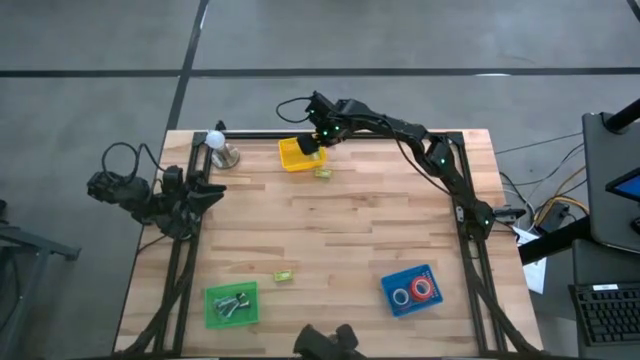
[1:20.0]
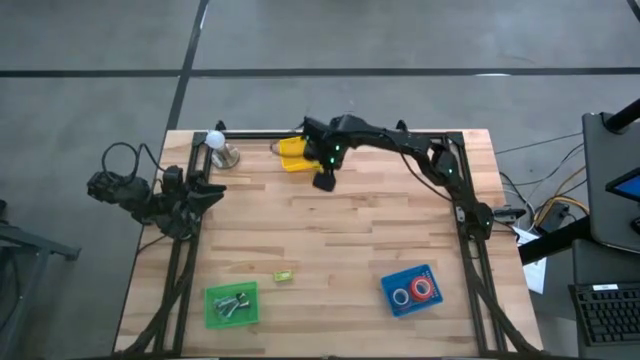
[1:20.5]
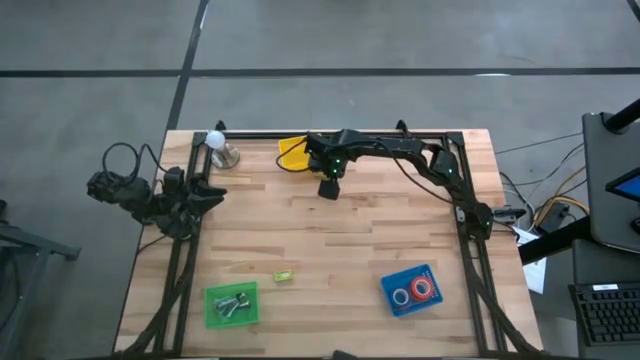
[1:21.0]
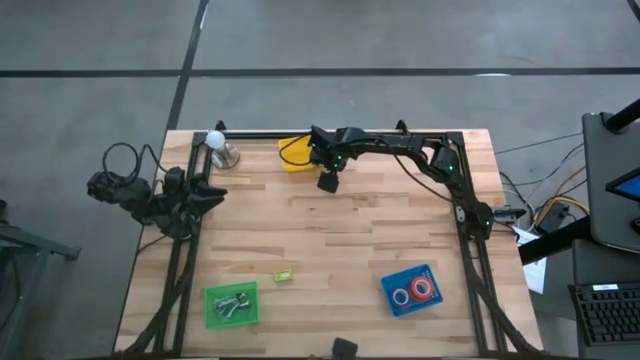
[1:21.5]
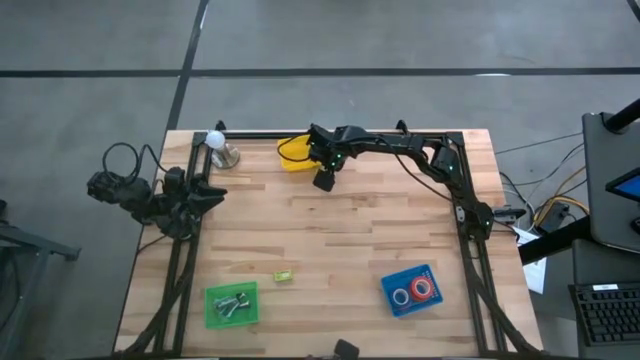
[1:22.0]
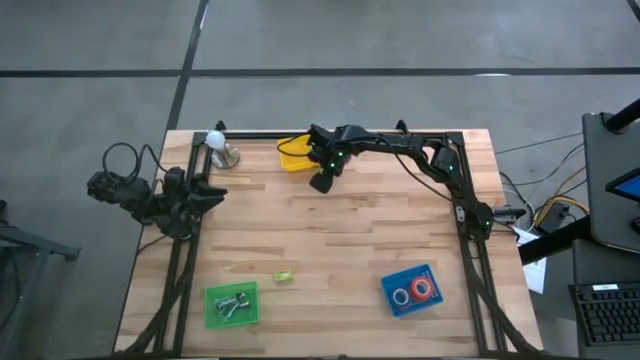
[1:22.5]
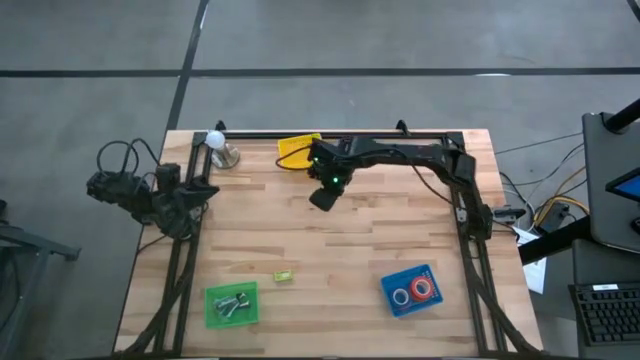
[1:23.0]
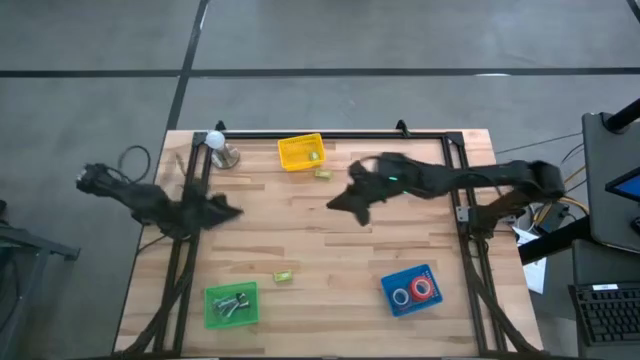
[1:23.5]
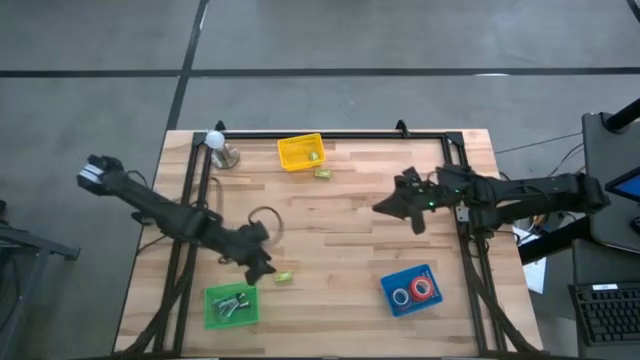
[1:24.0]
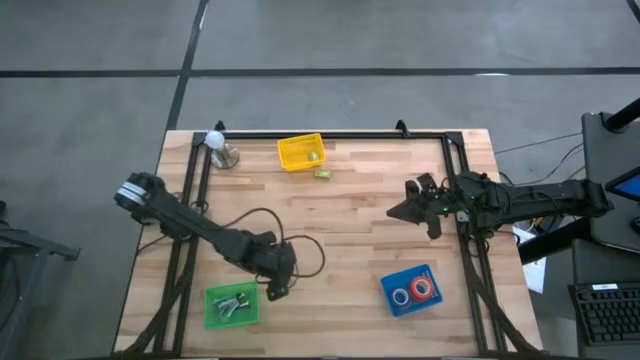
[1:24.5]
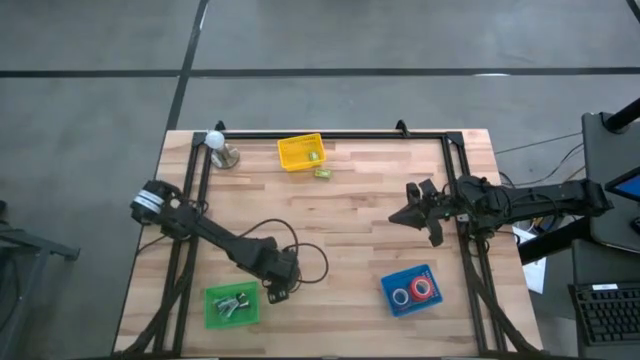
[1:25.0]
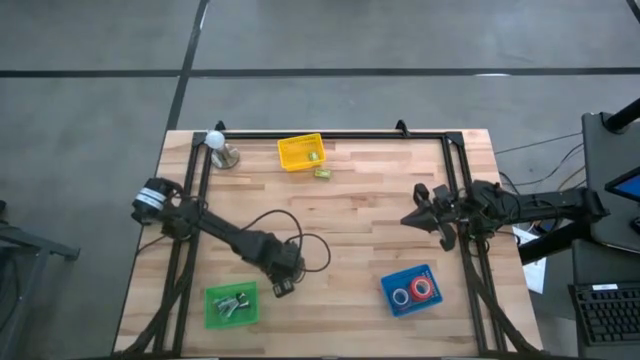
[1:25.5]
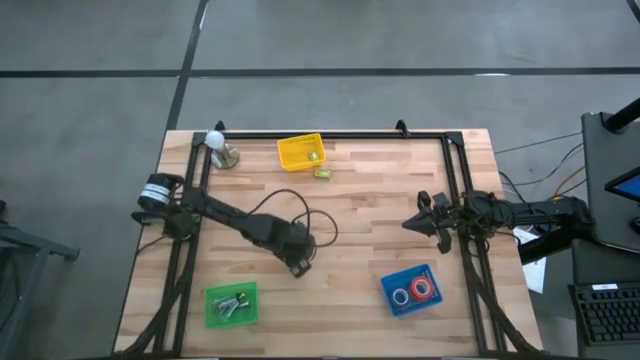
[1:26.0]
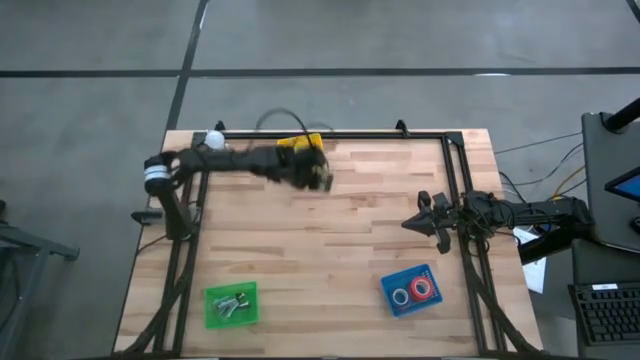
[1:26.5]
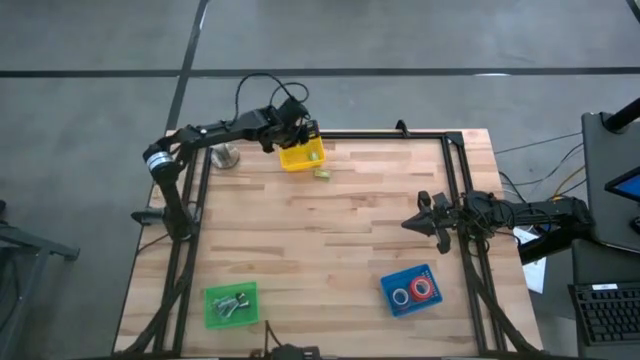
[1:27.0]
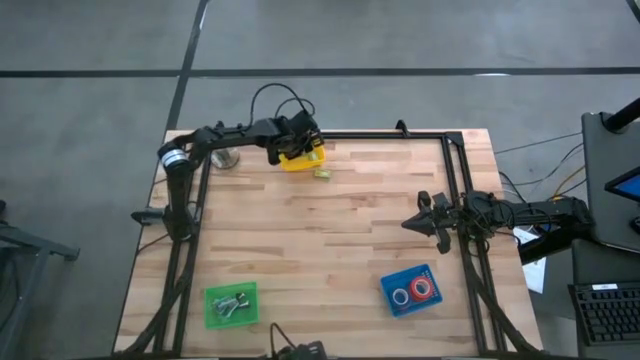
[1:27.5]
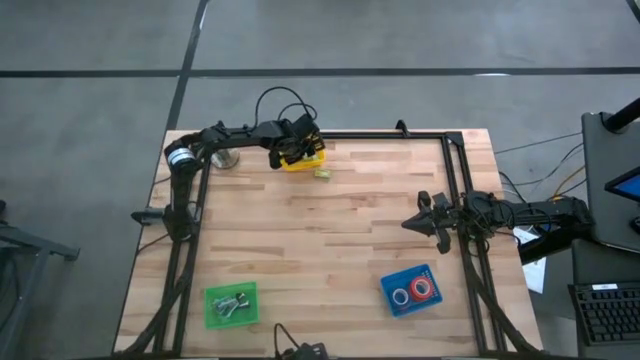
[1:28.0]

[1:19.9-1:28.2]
Task: Pick and place Stapler, Stapler remover, tape
Put the bottom green staple box into the yellow basket

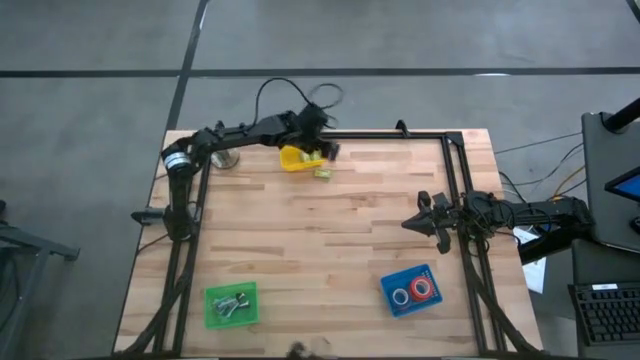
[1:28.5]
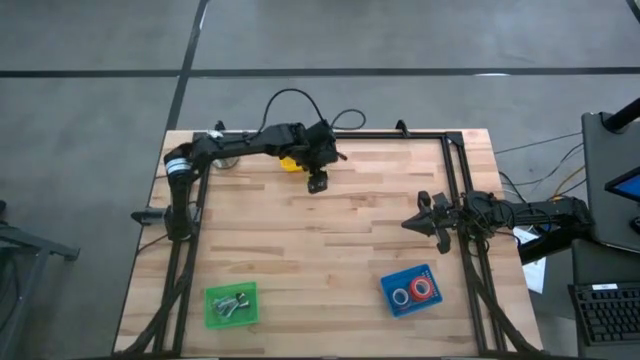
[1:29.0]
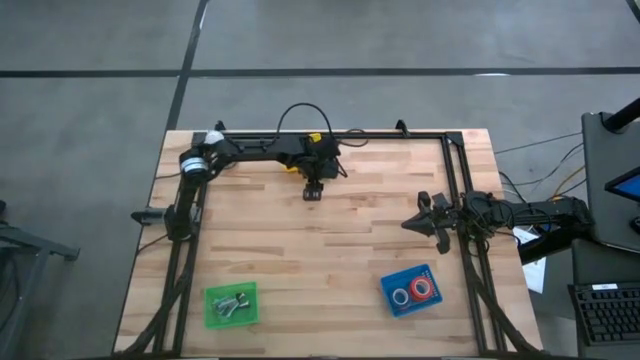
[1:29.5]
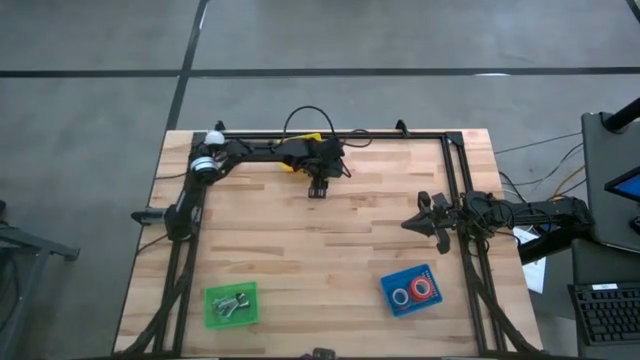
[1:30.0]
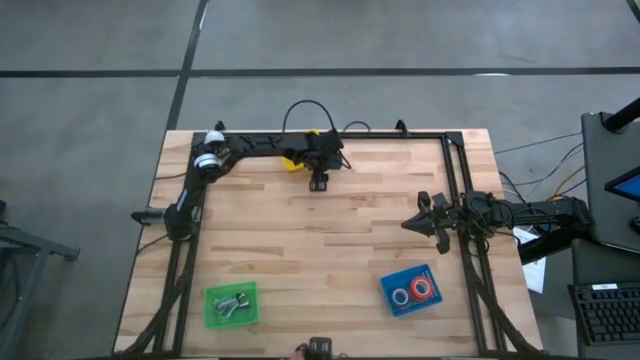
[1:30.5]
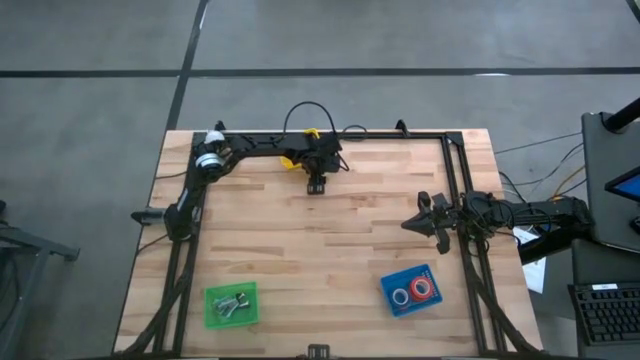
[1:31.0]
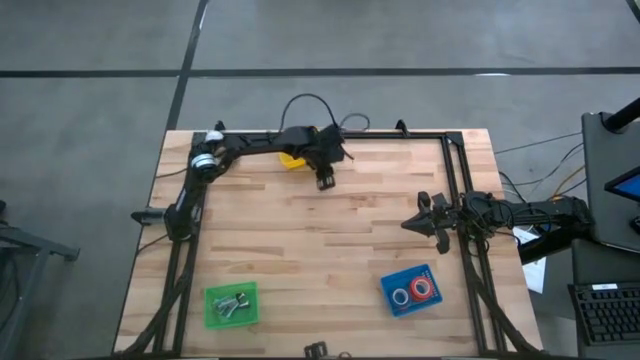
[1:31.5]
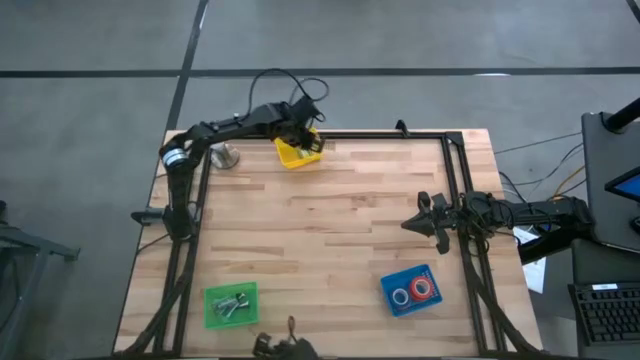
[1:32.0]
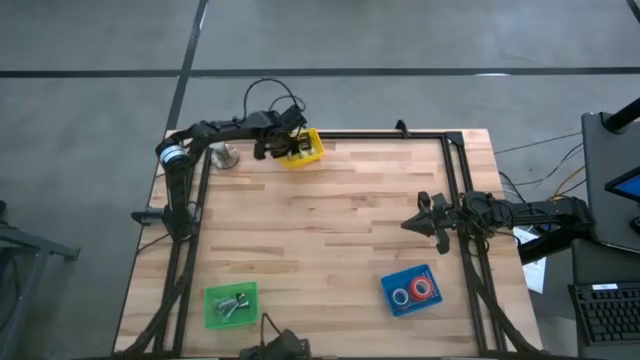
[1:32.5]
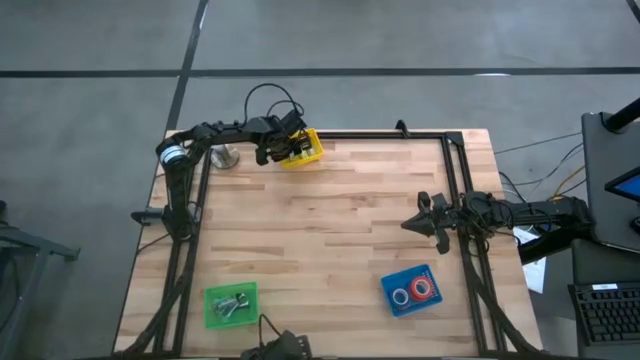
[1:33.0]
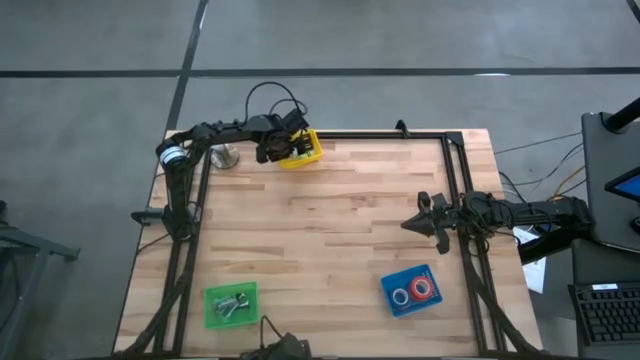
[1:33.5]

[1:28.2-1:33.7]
Put the green staple box into the yellow basket

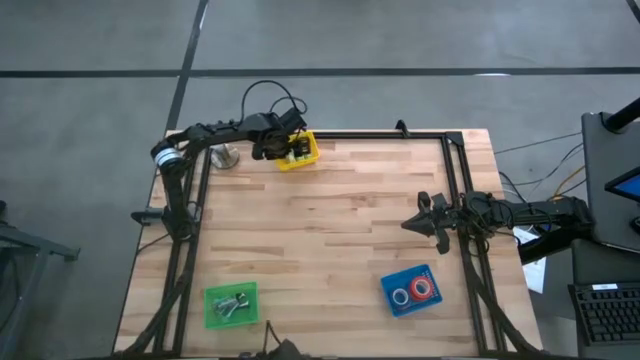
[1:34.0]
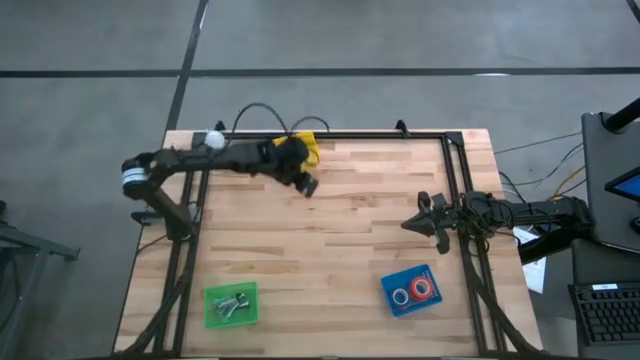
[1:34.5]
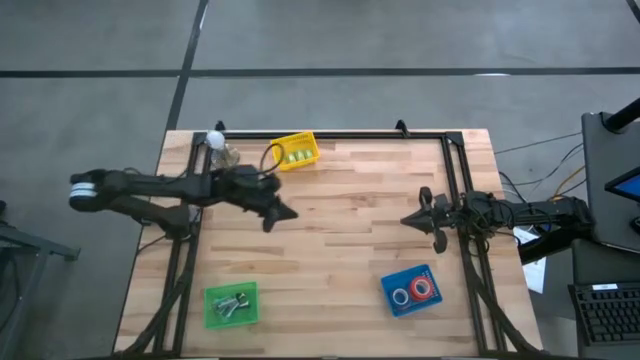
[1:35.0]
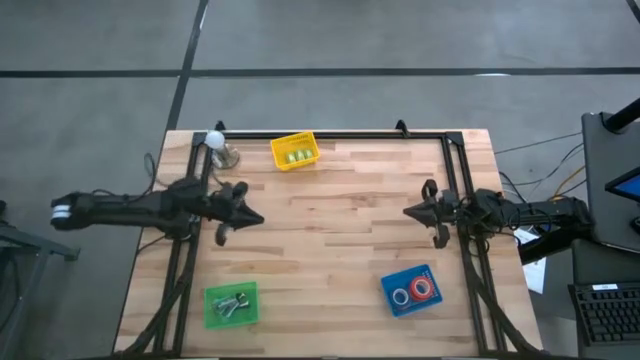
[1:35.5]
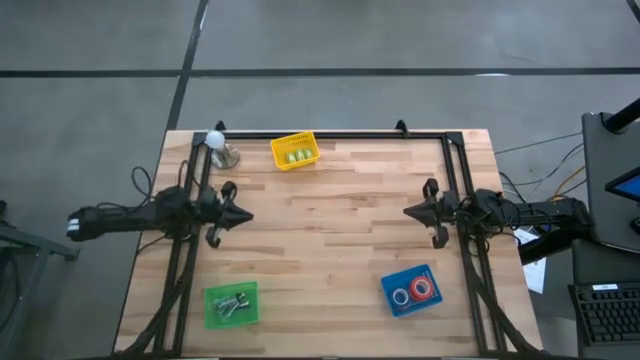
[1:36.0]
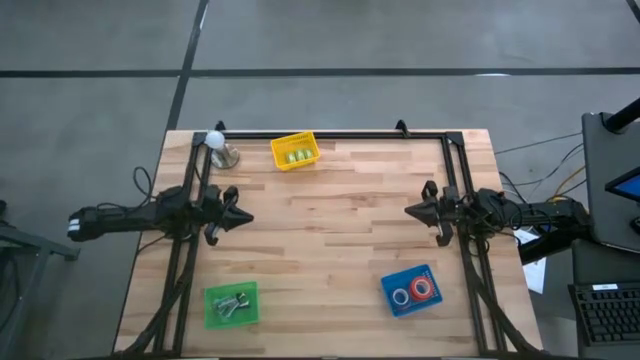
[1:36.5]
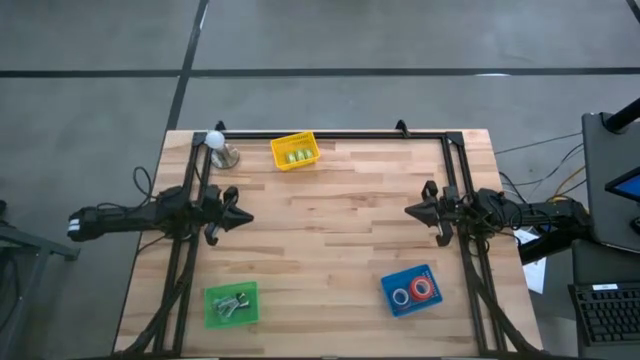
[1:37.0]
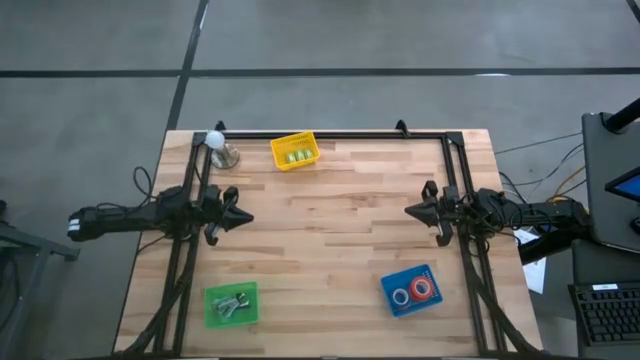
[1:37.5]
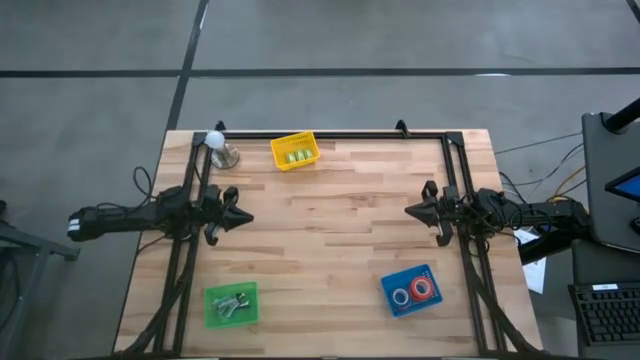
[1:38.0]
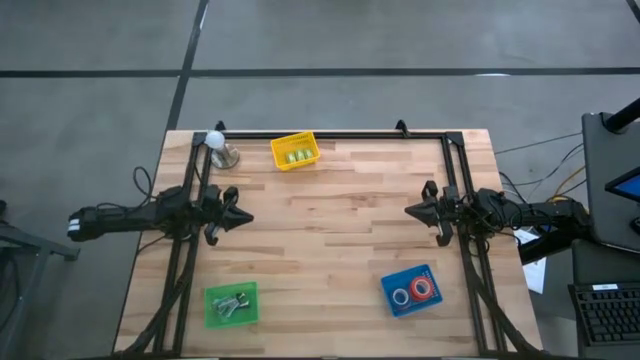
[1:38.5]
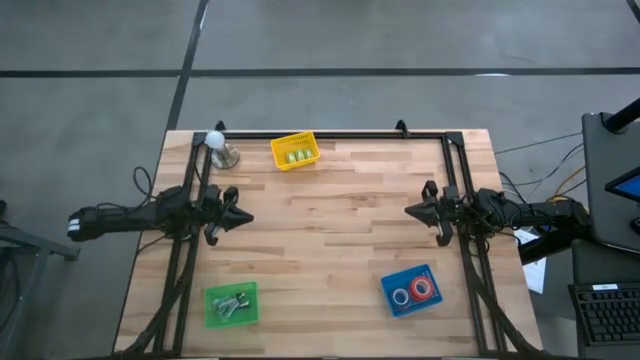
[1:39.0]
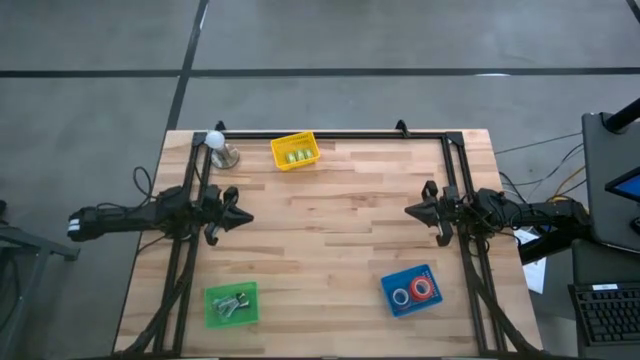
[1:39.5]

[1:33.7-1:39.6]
Return to Home Position

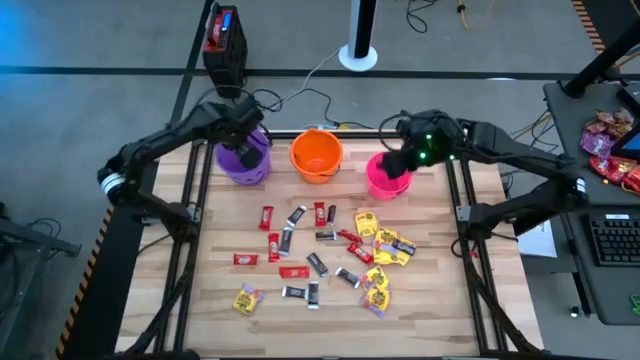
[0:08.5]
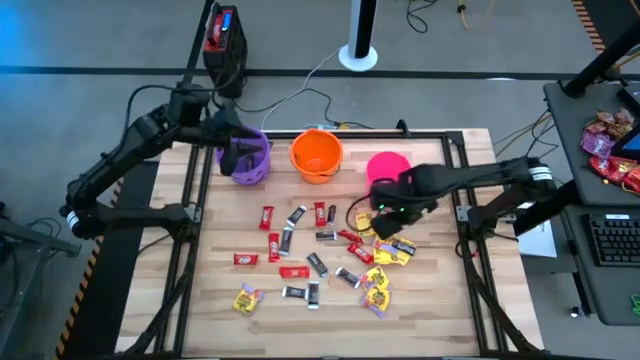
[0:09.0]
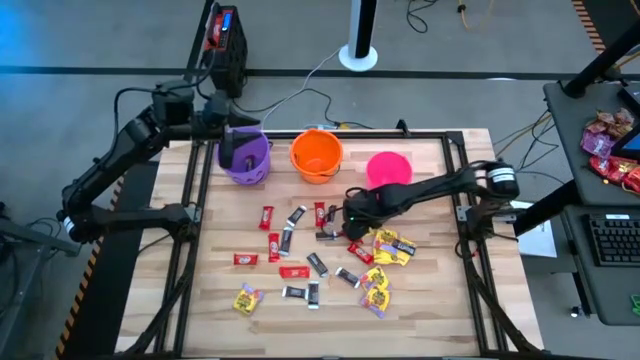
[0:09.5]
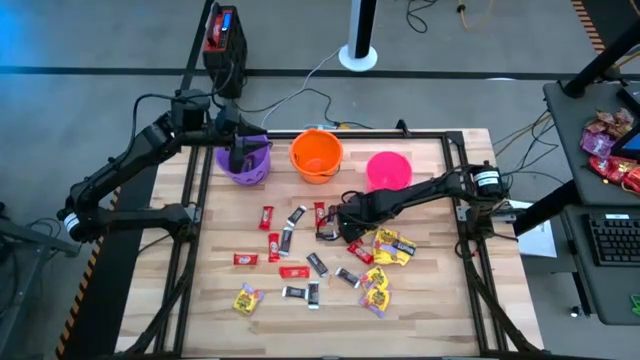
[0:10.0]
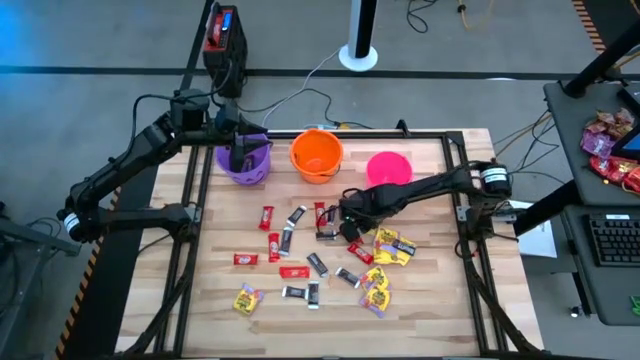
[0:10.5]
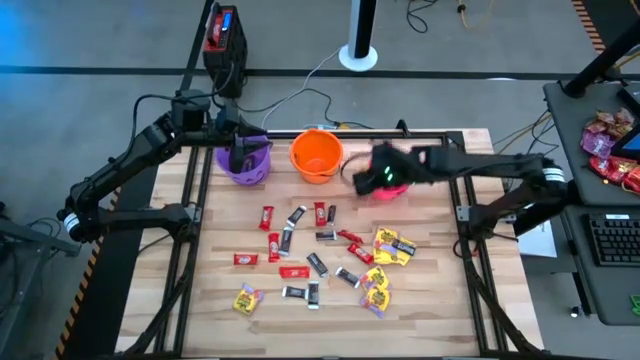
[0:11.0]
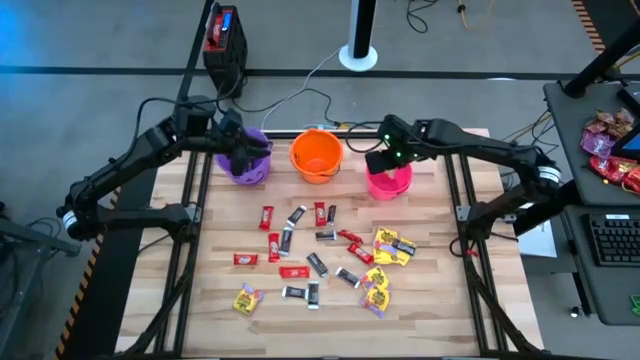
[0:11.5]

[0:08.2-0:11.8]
Task: Sort candy by brand, put in halloween buckets
Put the yellow candy into the pink bucket
